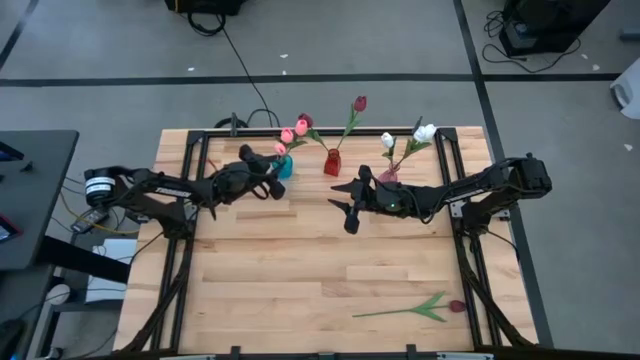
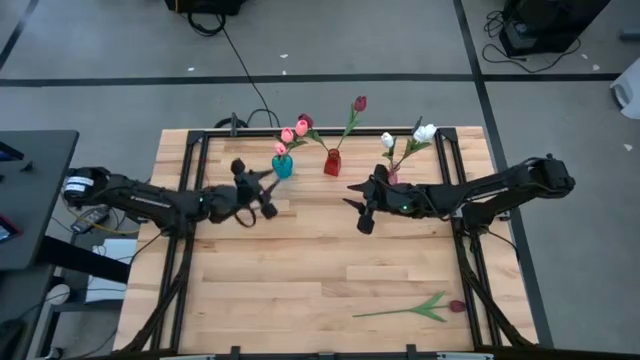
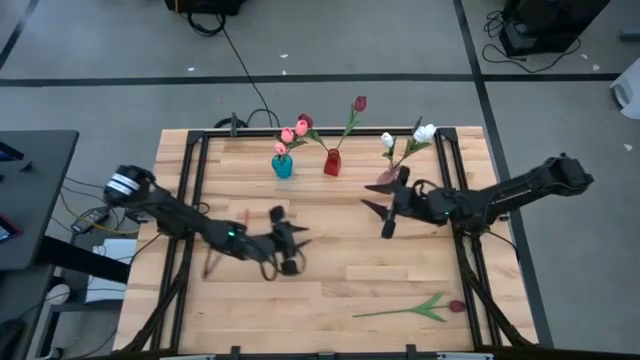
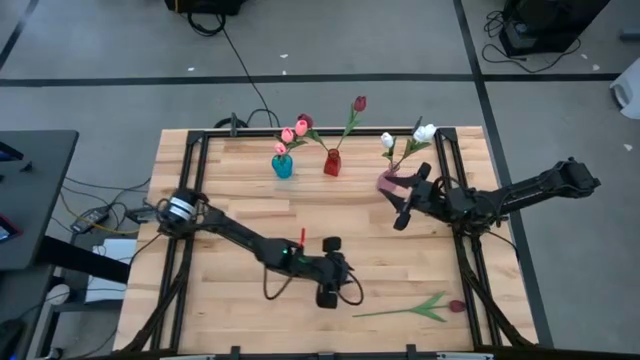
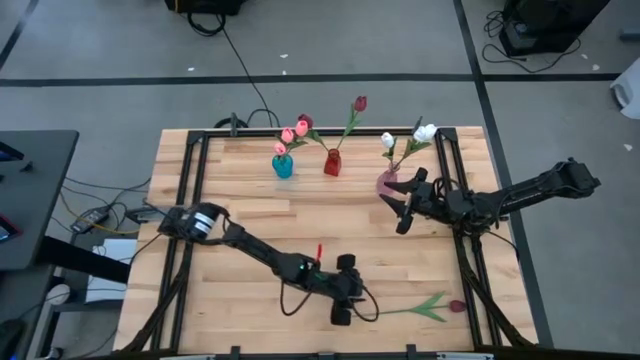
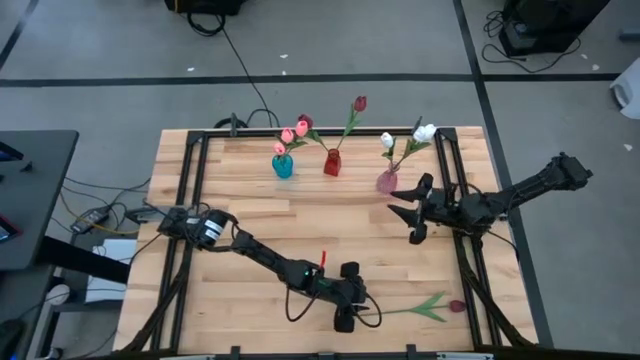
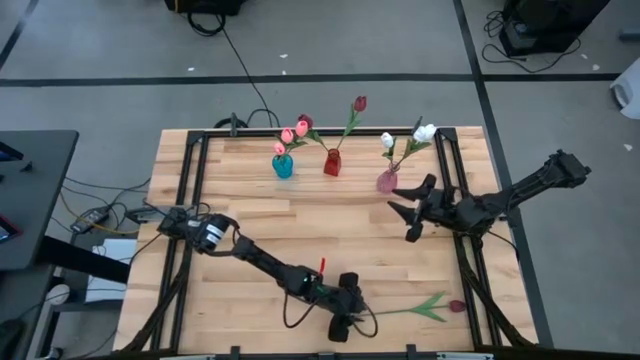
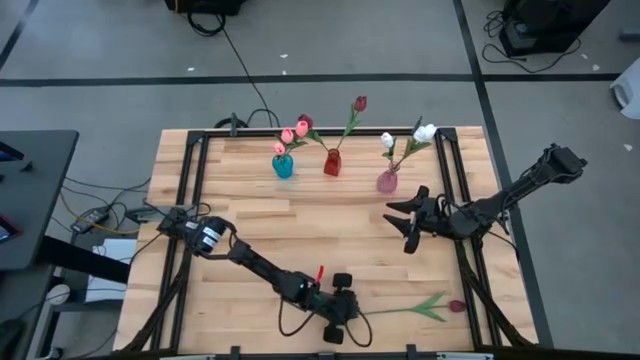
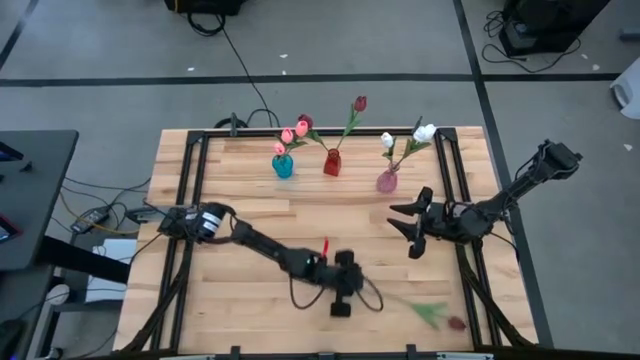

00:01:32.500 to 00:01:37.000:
Task: Sort flowers into vase by color
Put the red tulip into the red vase

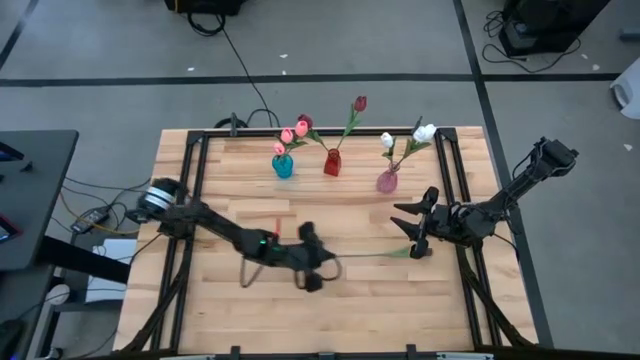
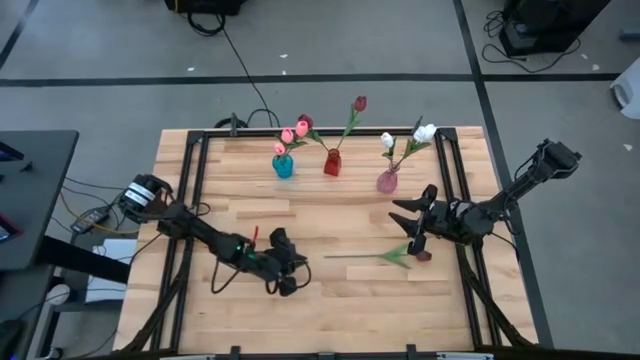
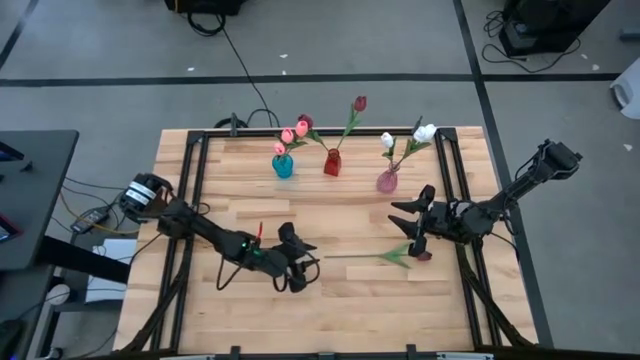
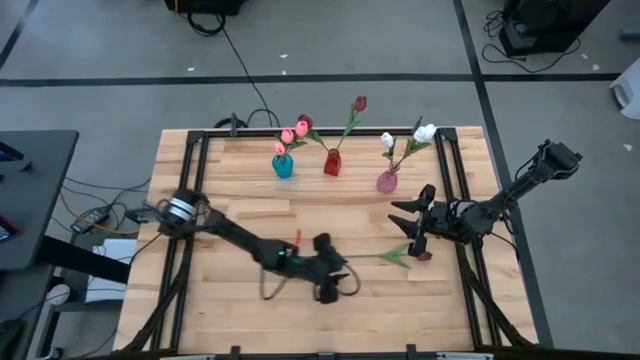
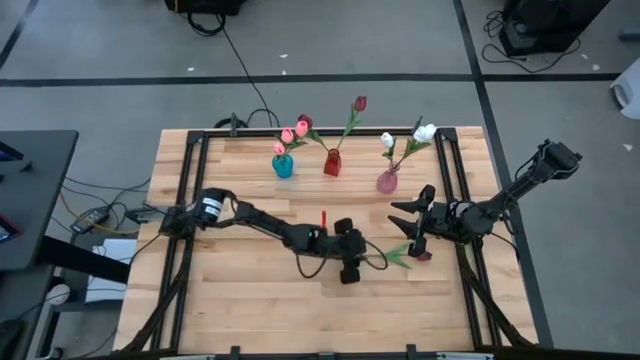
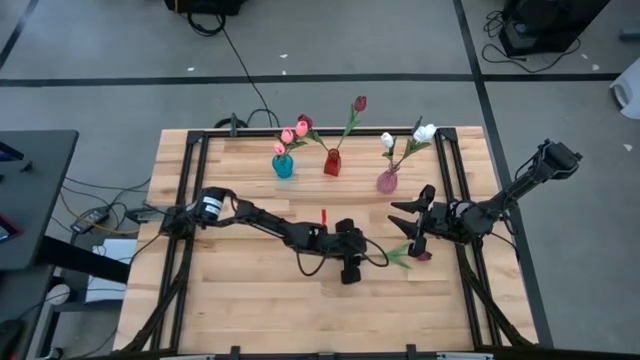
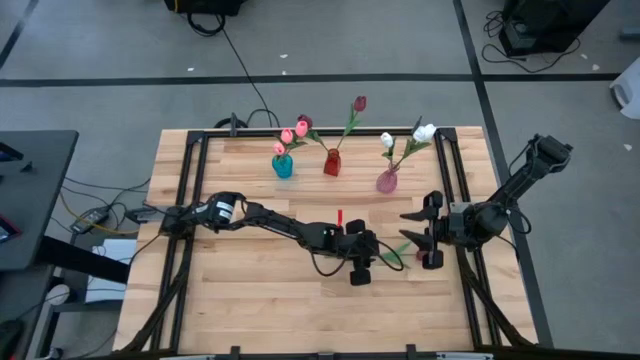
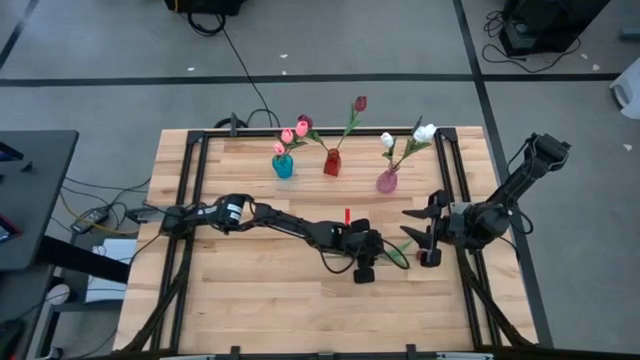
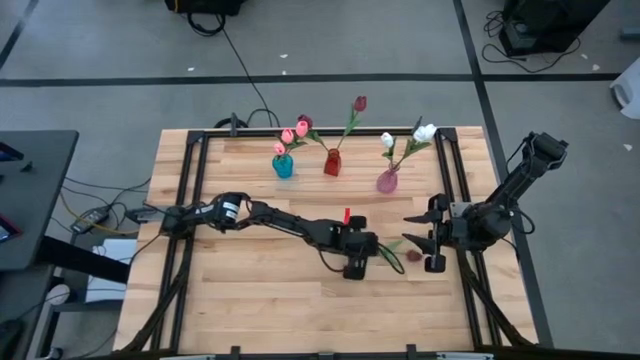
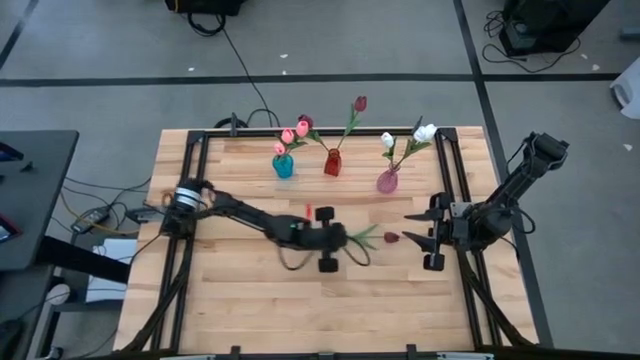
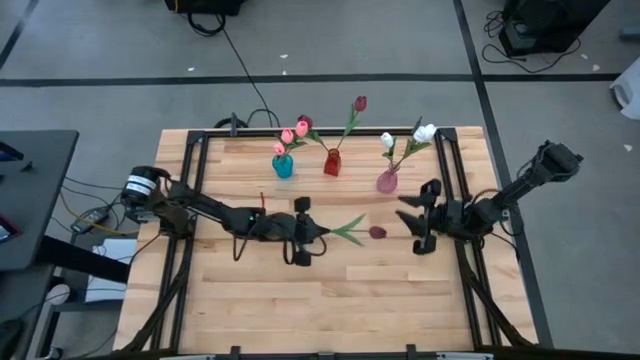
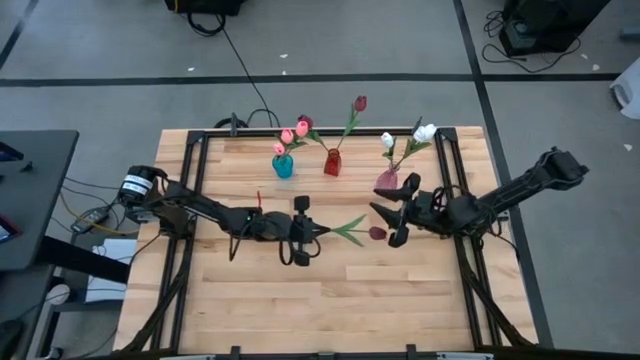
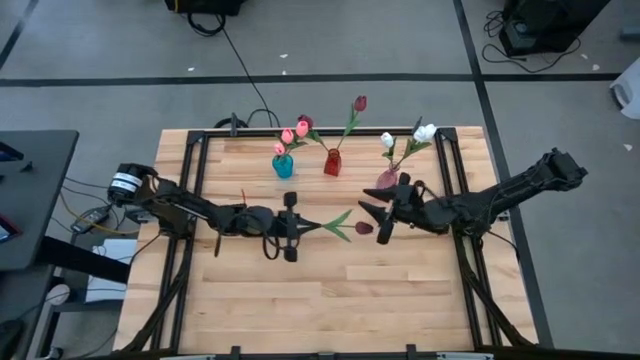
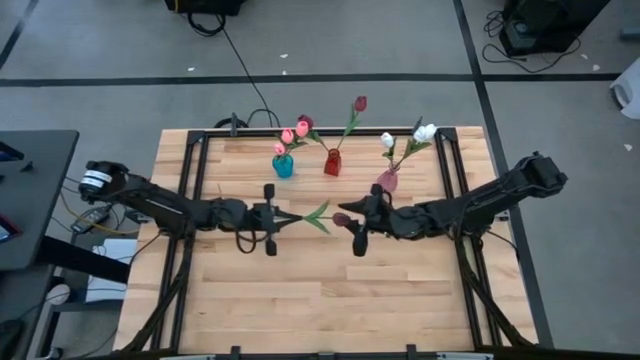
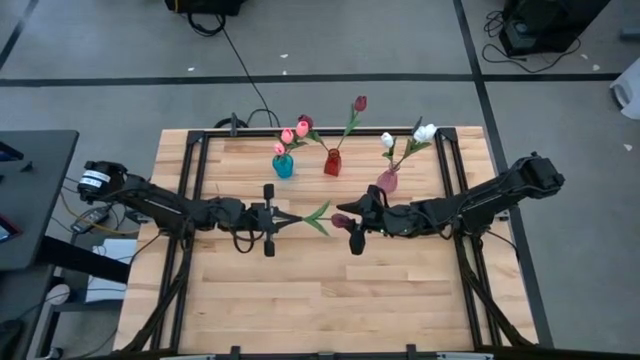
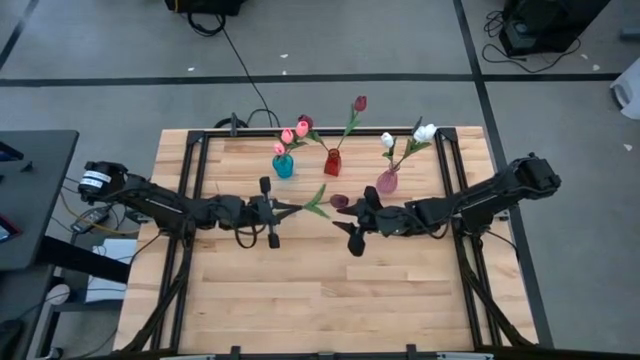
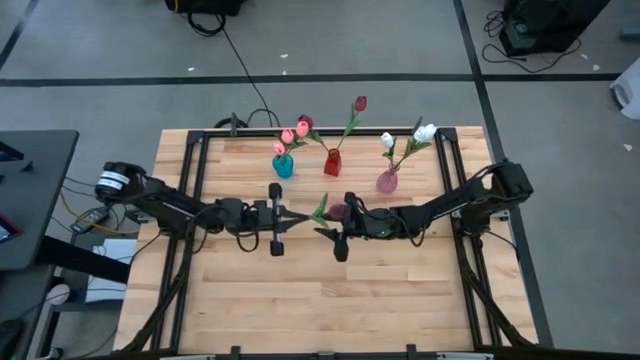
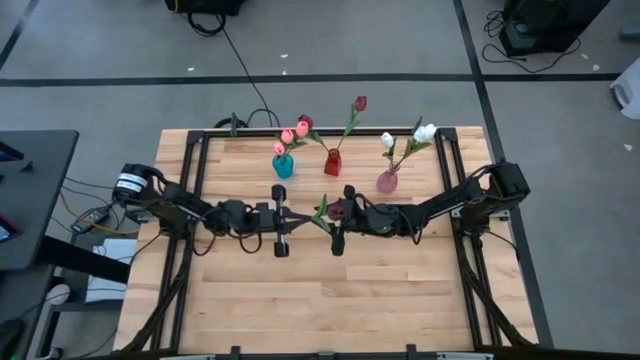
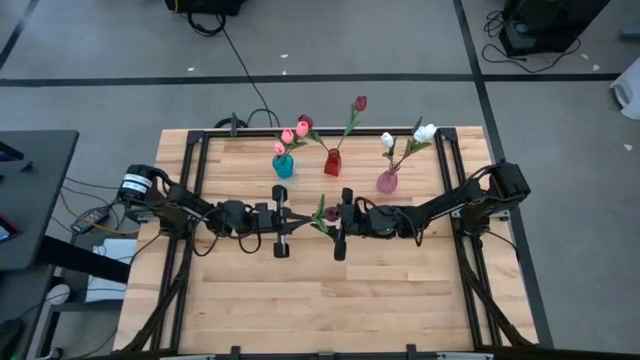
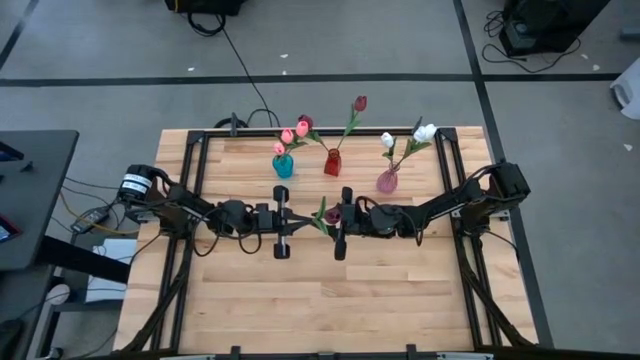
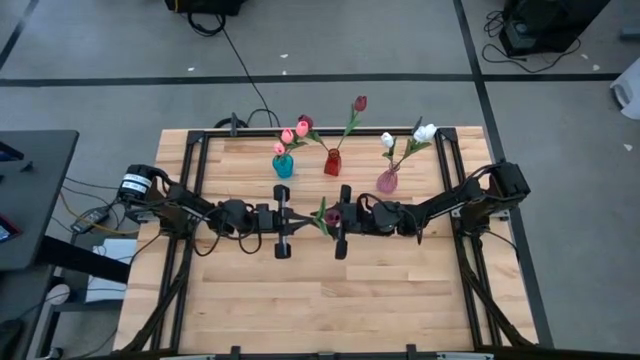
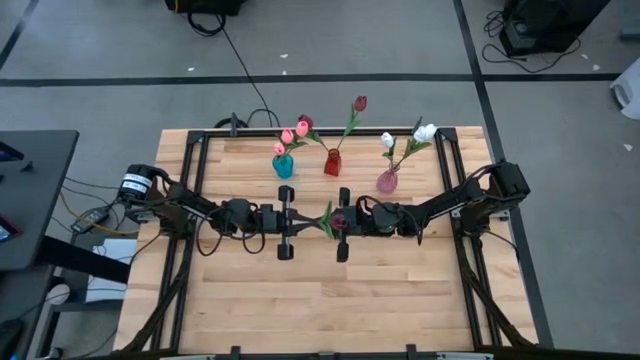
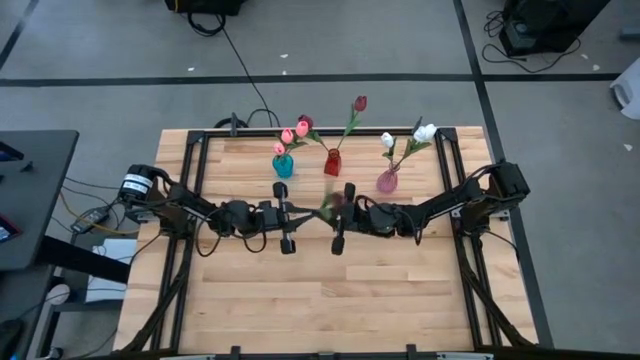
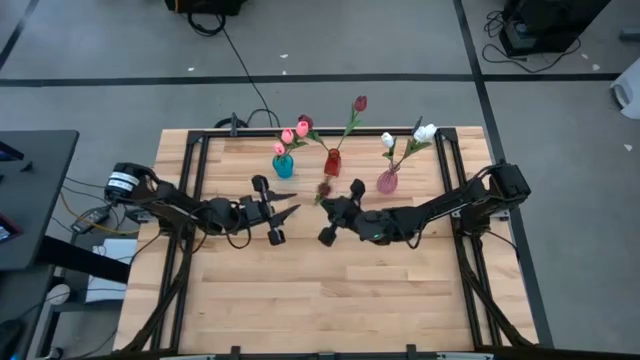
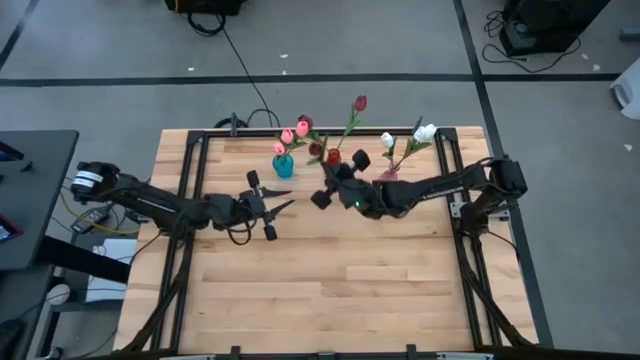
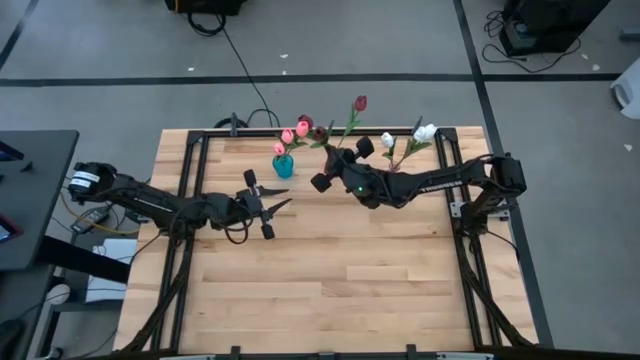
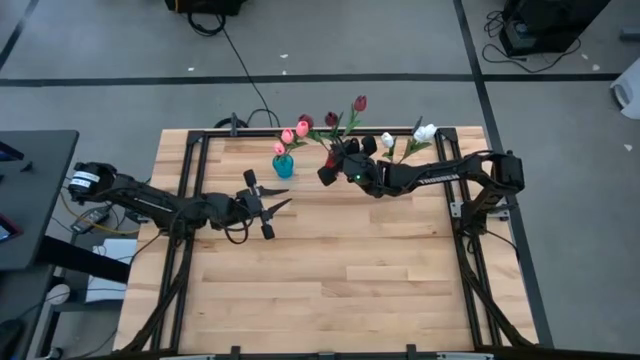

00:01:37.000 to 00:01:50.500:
Put the violet tulip into the red vase

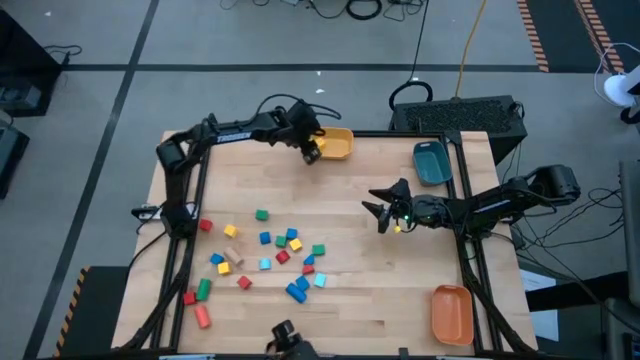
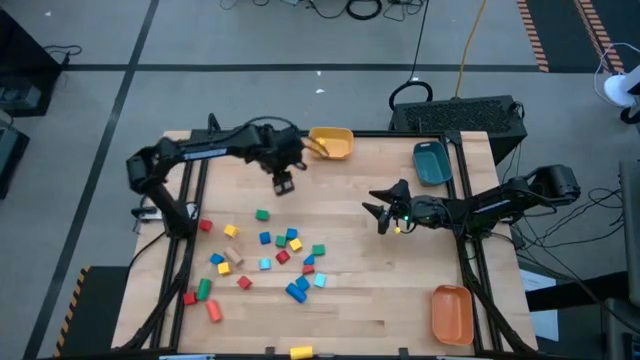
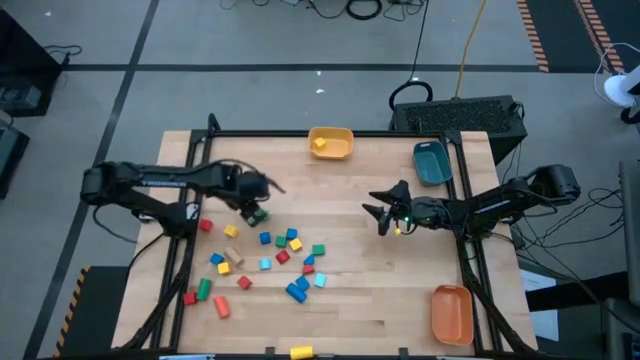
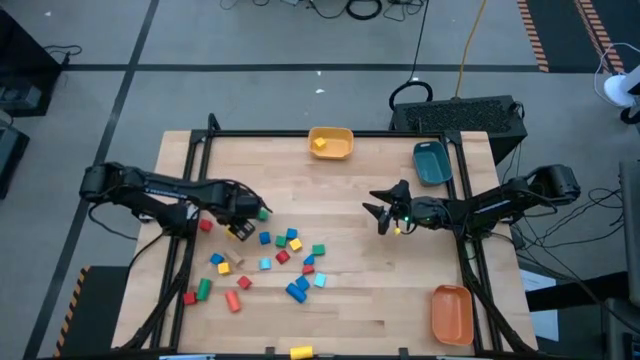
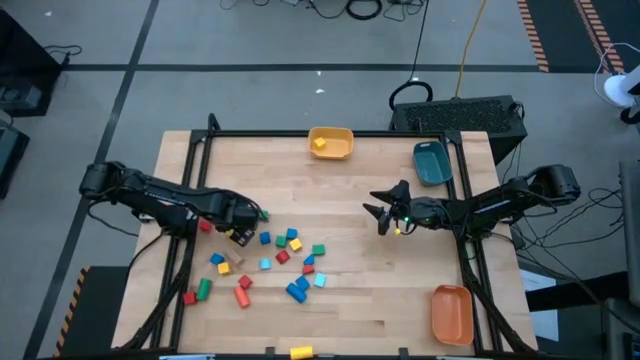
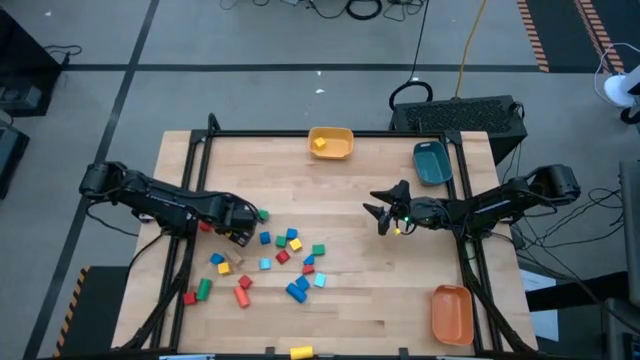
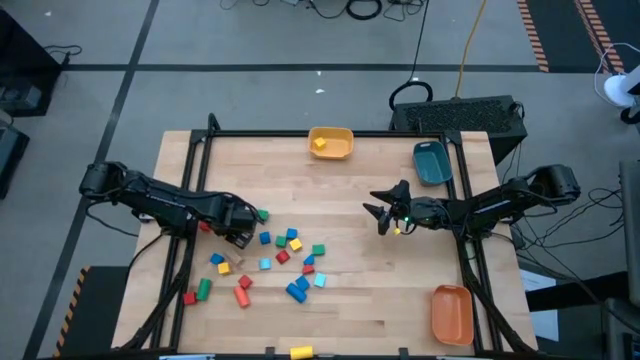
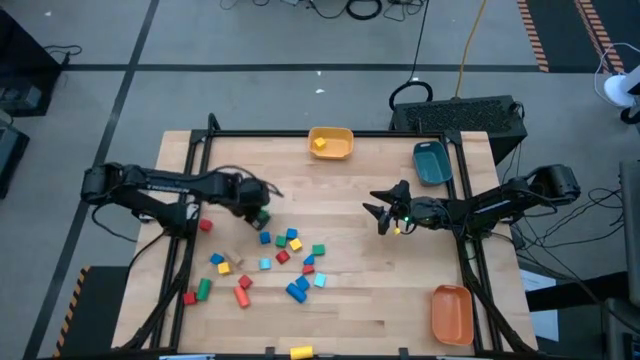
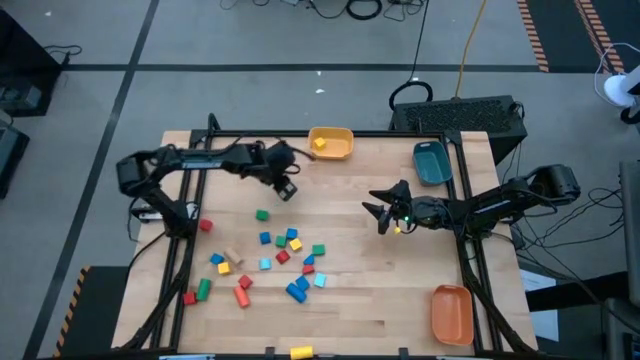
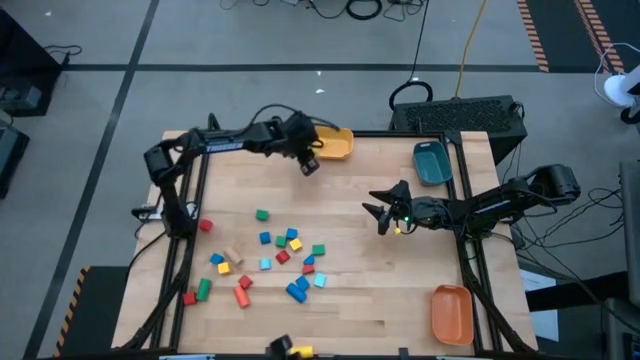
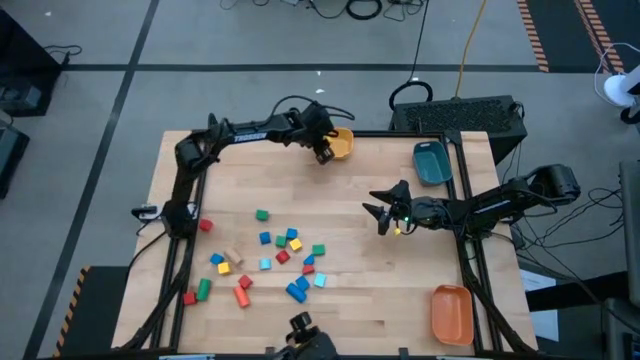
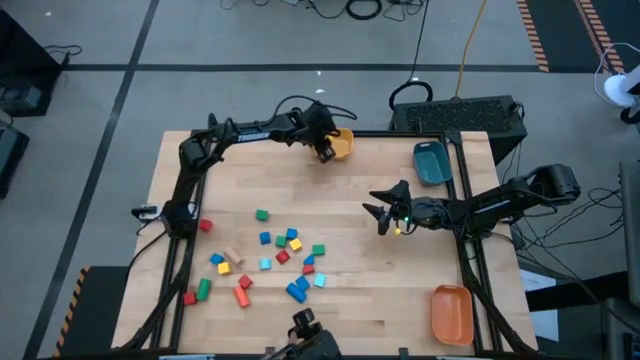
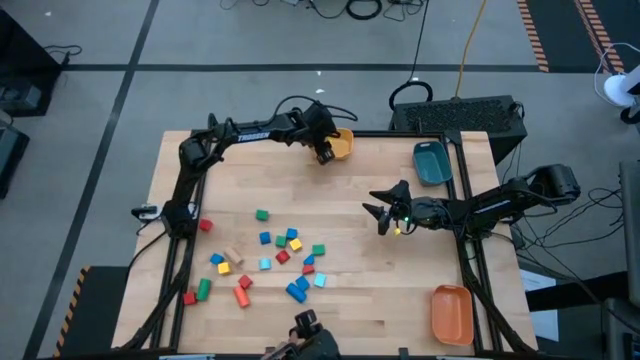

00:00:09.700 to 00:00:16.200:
Task: Sort blocks by size
Put the yellow square block into the yellow bin
